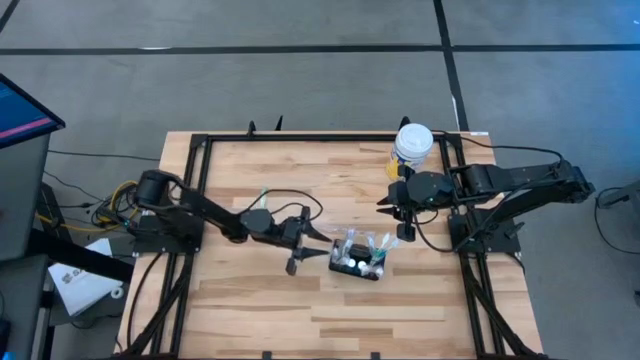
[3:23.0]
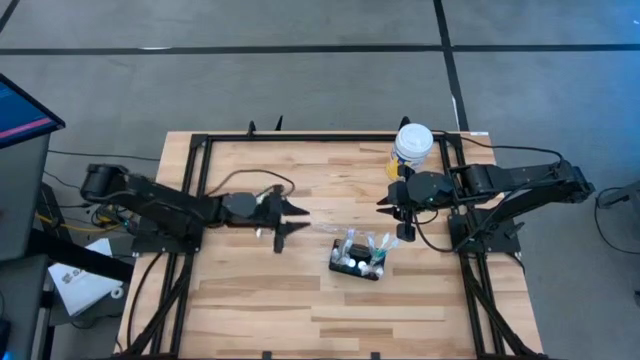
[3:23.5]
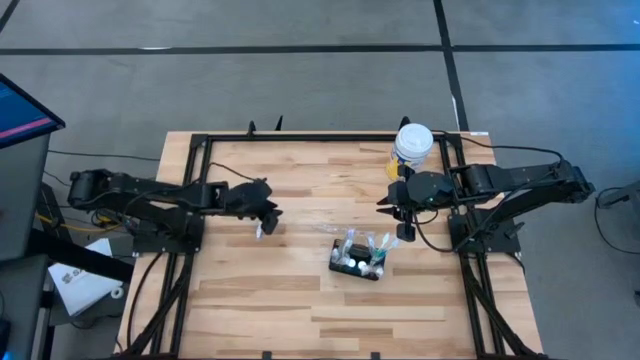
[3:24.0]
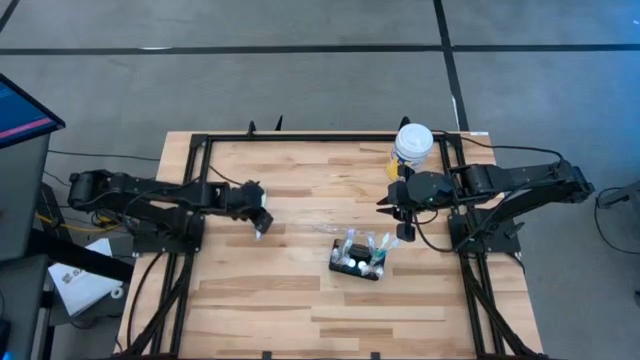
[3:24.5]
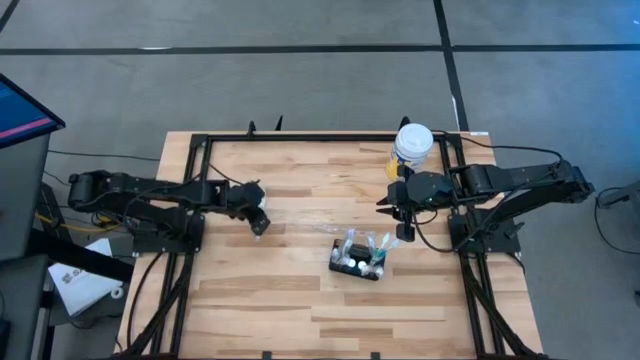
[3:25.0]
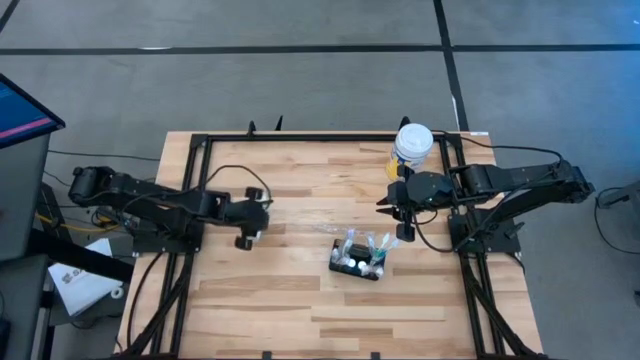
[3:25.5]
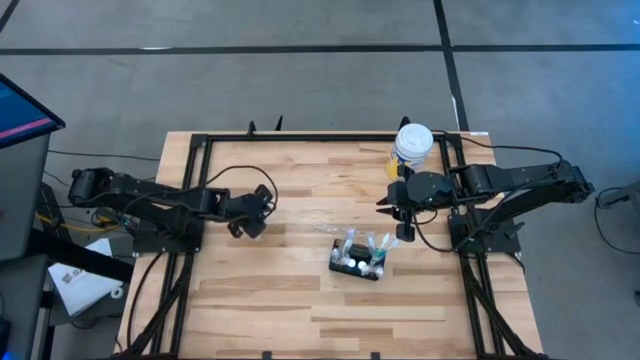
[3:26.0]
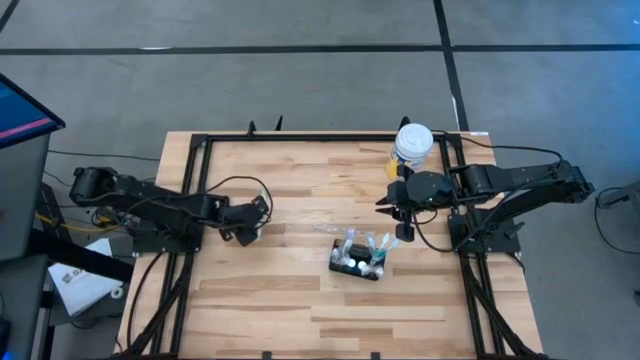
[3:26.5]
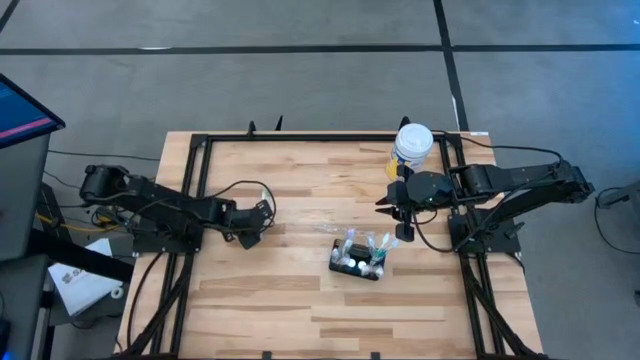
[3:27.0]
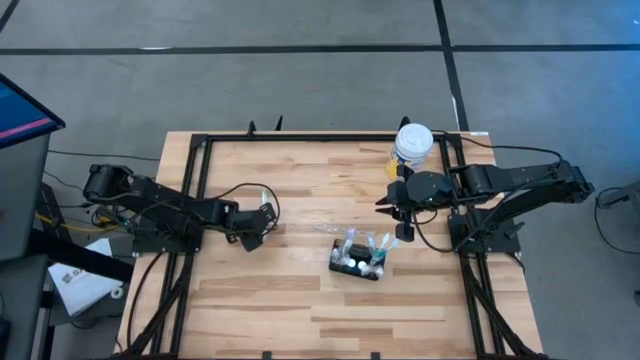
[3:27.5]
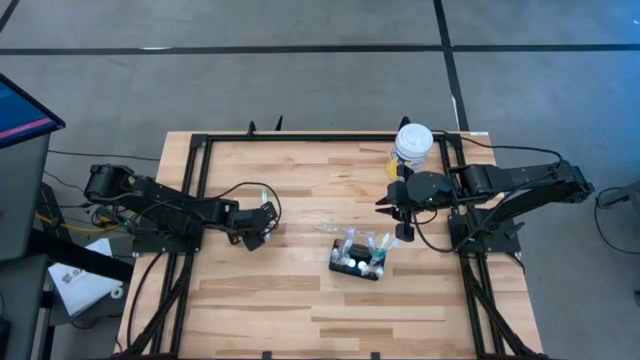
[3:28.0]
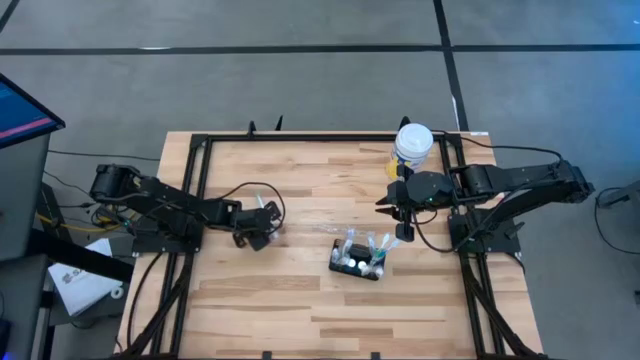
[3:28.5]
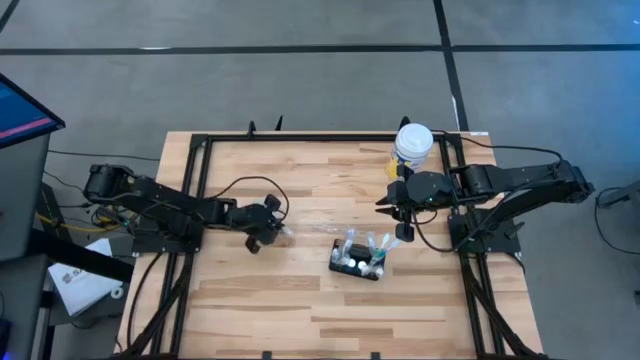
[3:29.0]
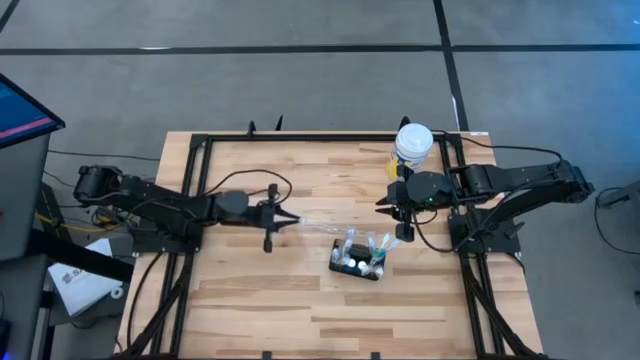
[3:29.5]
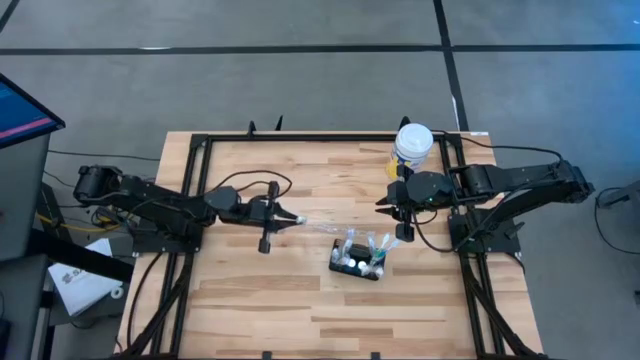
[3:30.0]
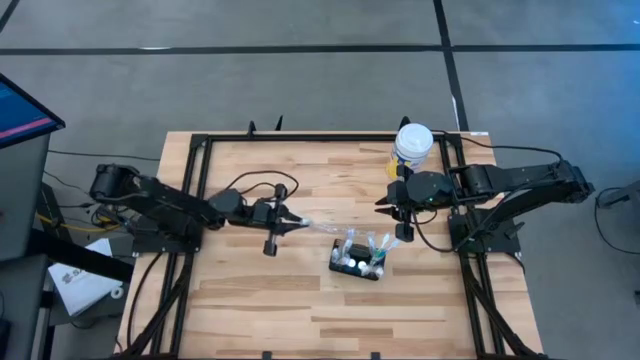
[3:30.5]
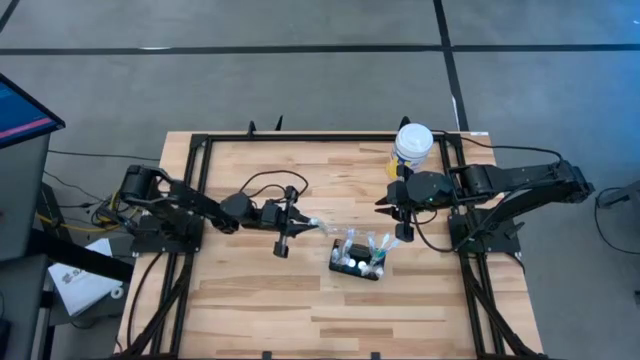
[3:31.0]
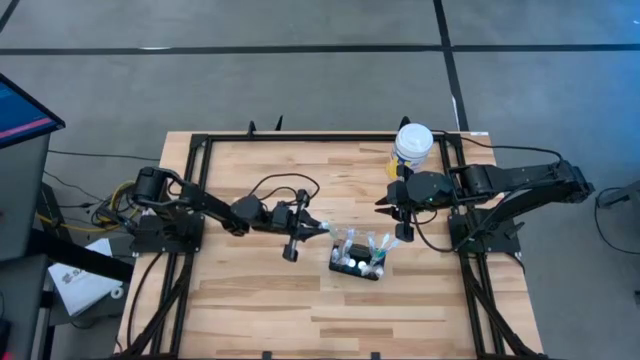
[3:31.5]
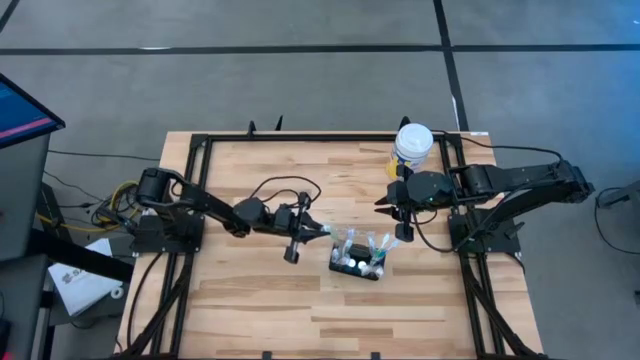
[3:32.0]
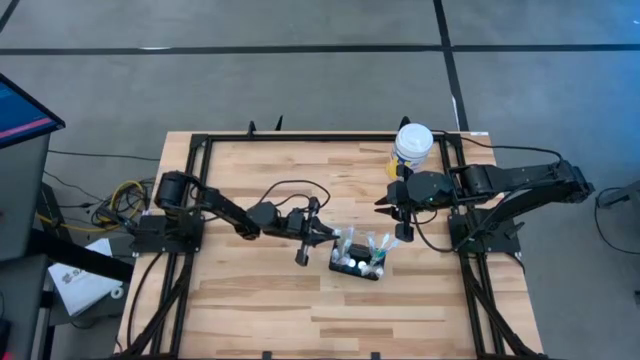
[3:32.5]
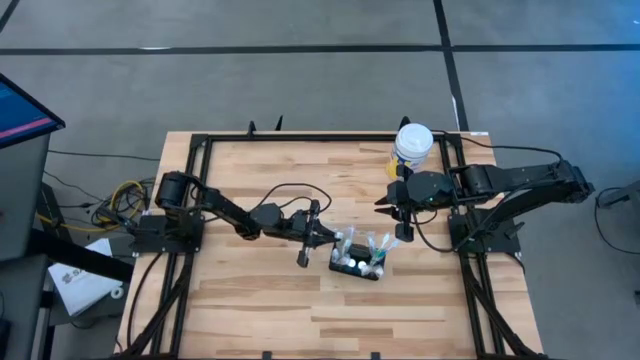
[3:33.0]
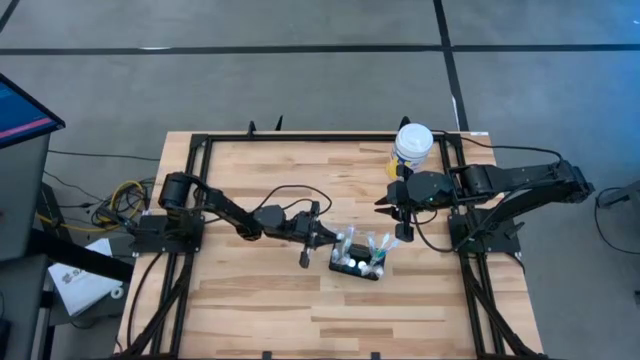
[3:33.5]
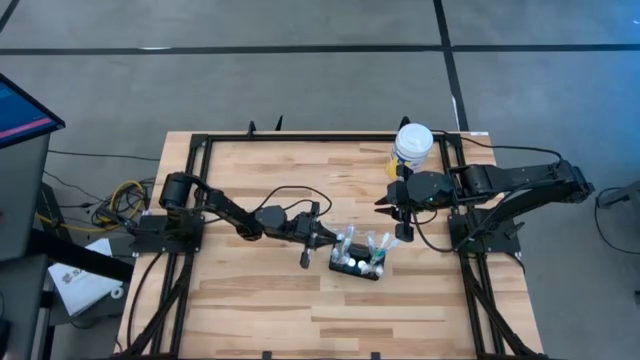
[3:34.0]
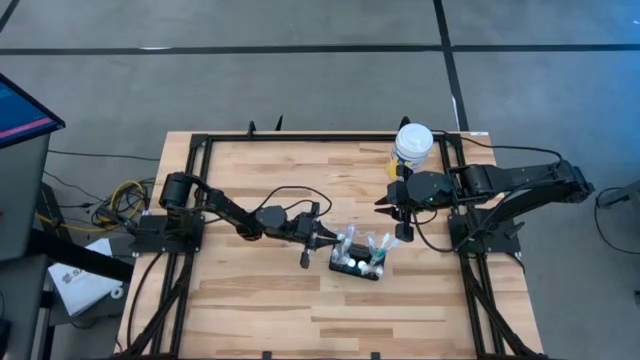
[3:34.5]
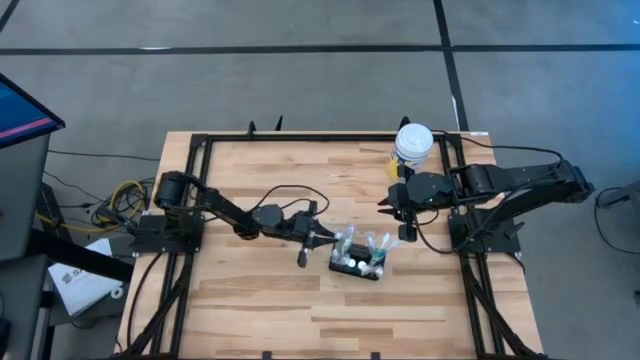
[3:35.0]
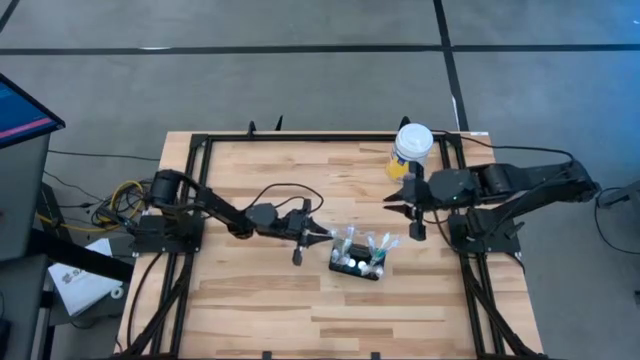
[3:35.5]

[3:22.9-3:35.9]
Task: Pick & Place toothbrushing station
Put the green toothbrush into the mesh organizer

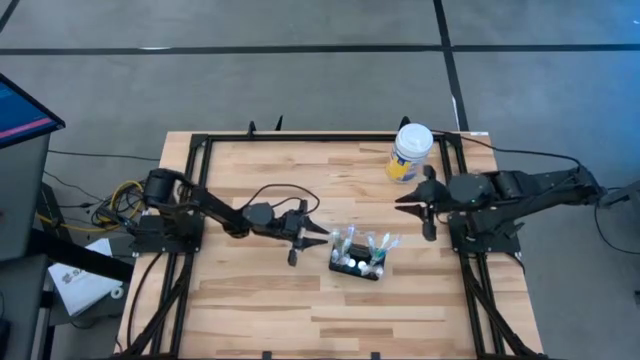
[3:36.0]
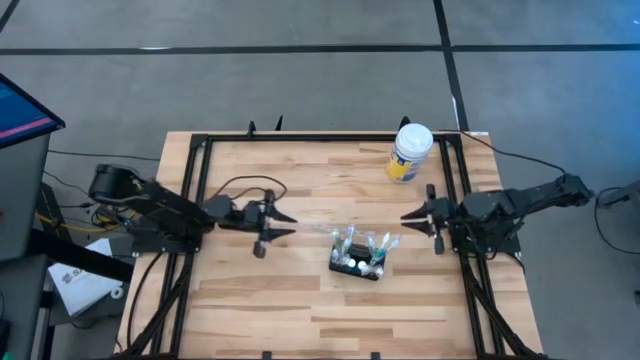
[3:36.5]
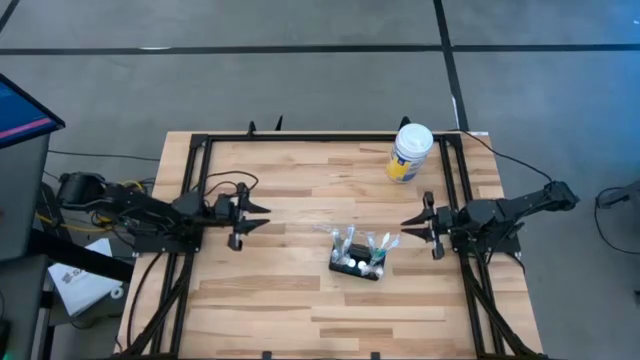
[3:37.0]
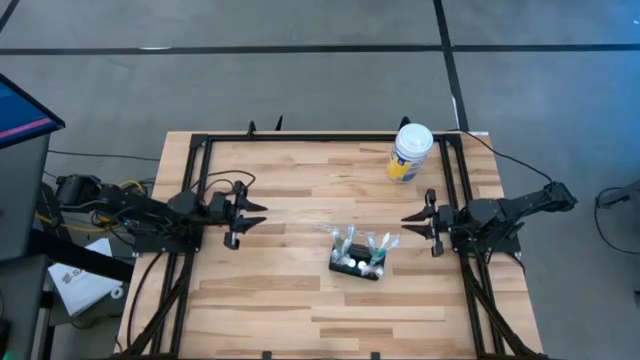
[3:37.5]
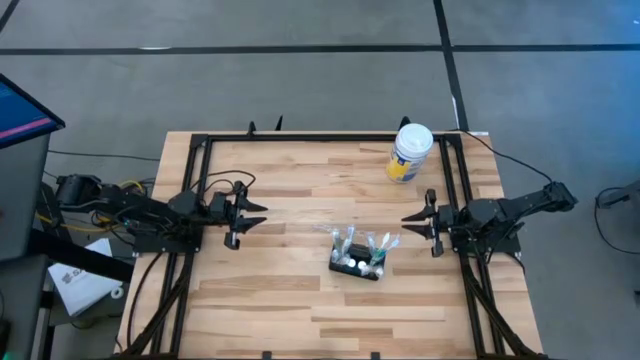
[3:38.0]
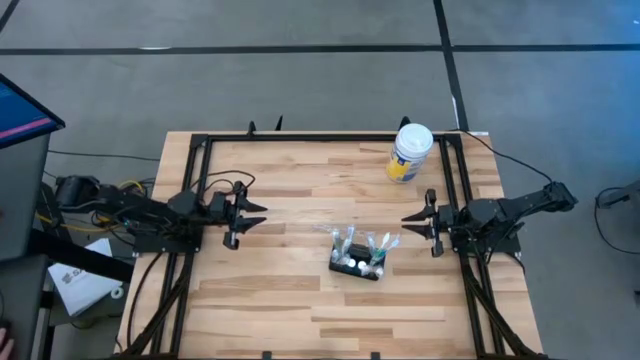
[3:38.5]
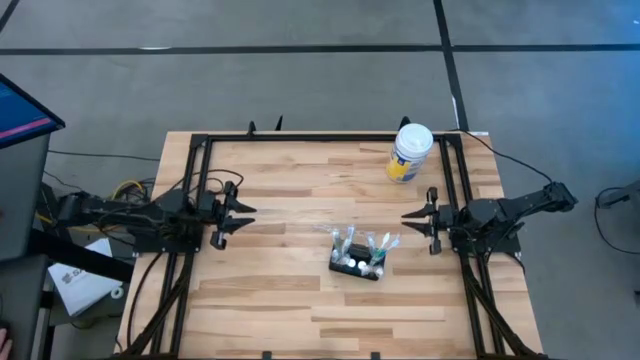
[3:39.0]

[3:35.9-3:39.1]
Return to Home Position

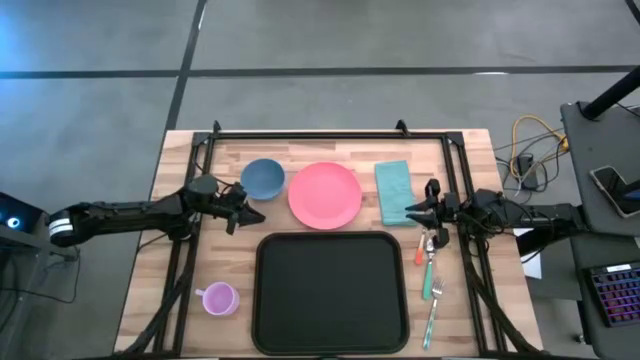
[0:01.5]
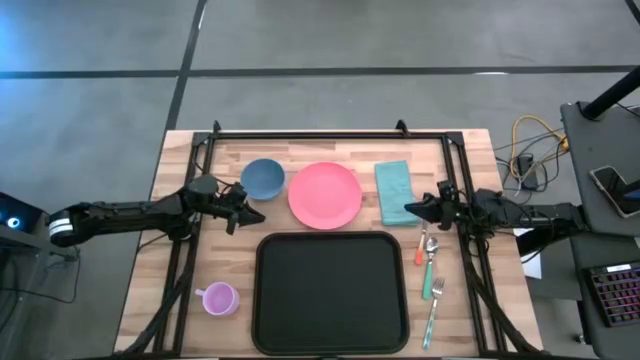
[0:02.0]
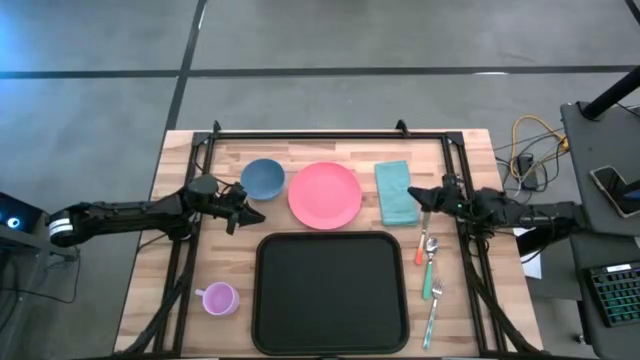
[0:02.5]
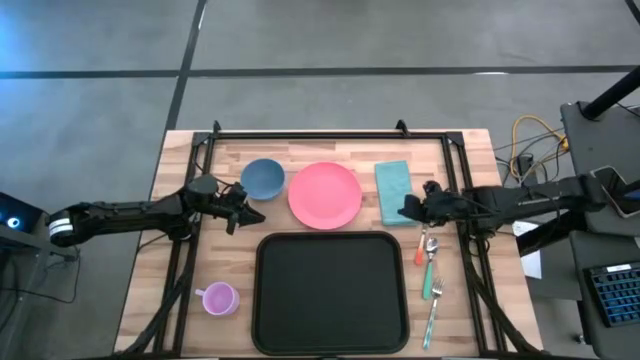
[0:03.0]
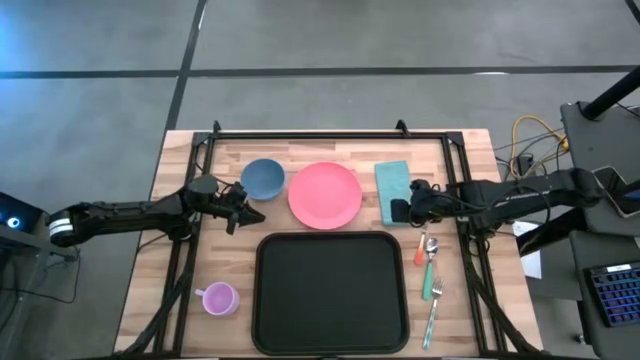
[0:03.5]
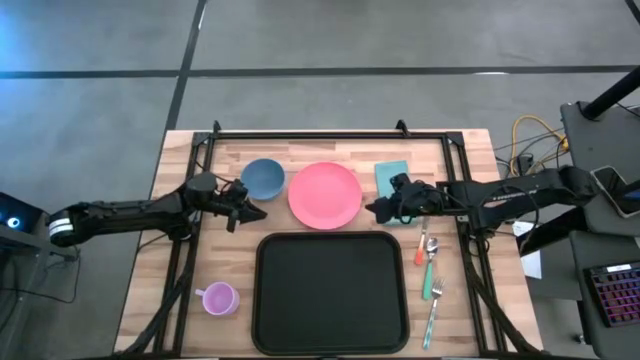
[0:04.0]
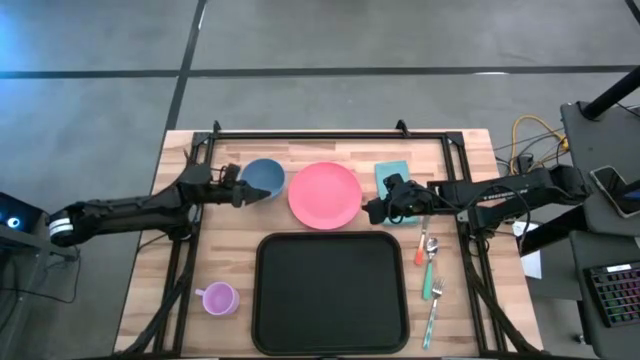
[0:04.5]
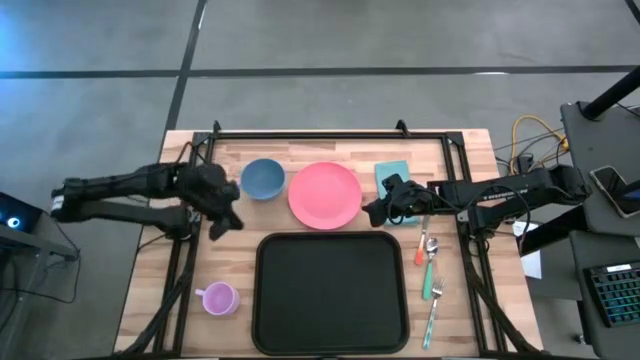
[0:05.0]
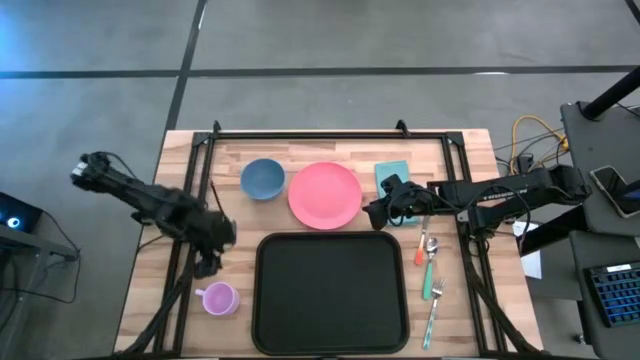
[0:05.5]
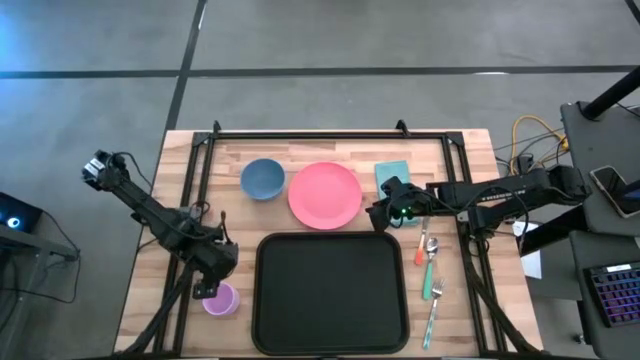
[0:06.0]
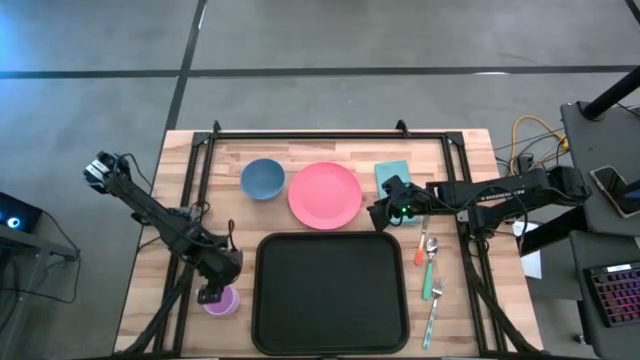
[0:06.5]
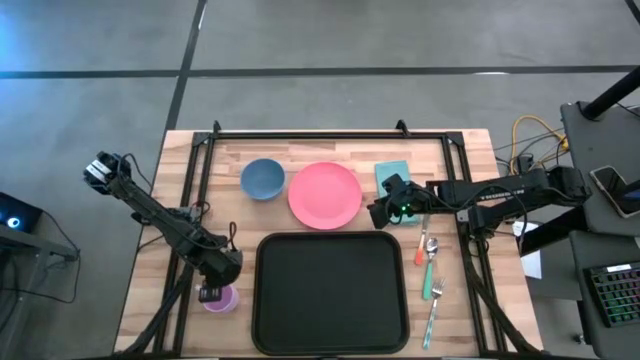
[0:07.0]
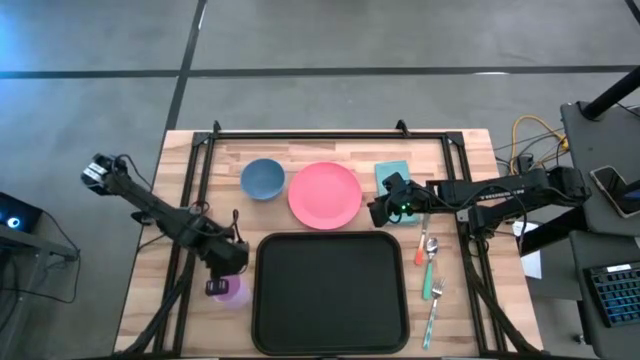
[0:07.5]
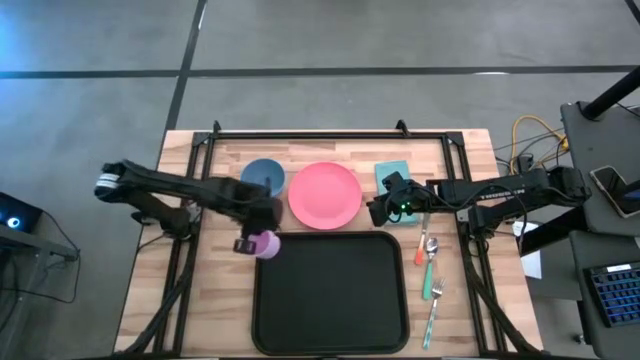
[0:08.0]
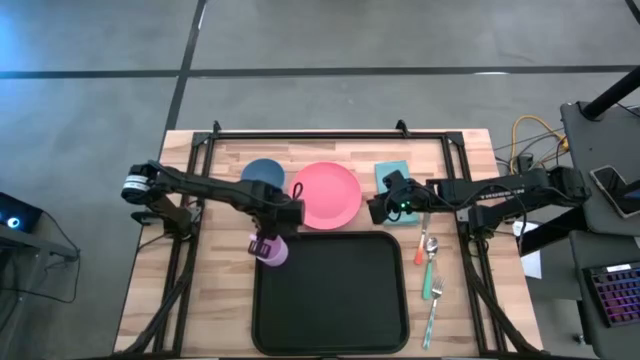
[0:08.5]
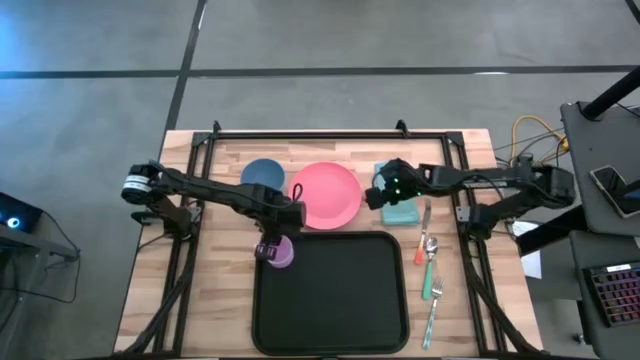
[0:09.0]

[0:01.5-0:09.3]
Task: Set up tray
Put the light purple cup on the black serving tray
